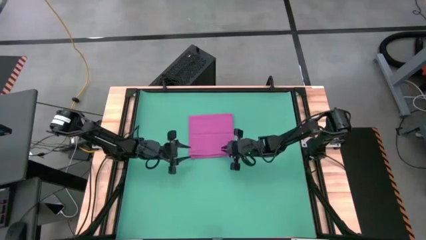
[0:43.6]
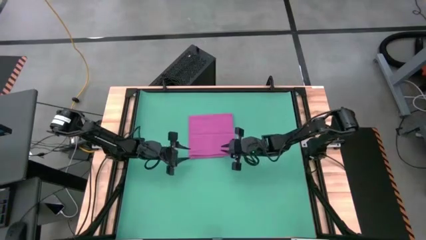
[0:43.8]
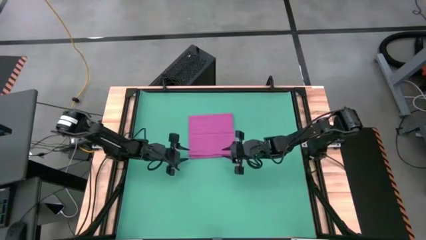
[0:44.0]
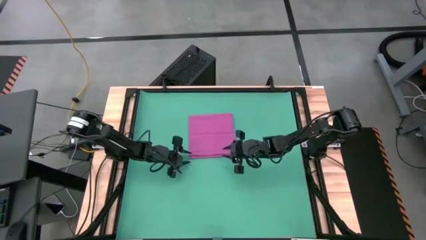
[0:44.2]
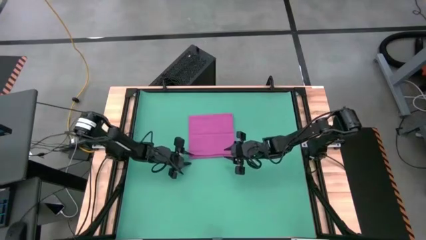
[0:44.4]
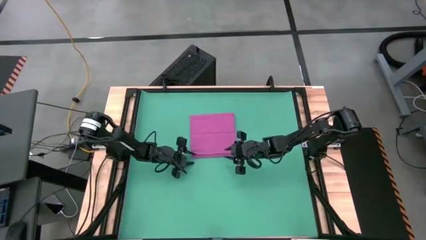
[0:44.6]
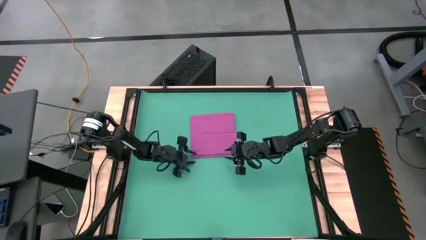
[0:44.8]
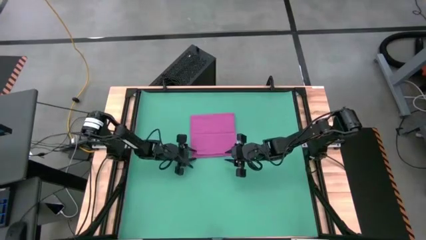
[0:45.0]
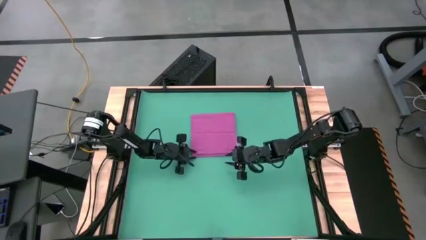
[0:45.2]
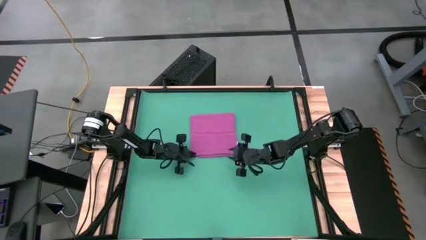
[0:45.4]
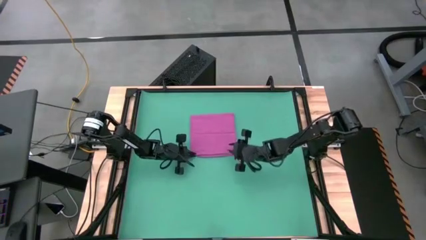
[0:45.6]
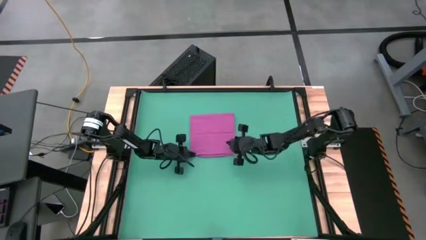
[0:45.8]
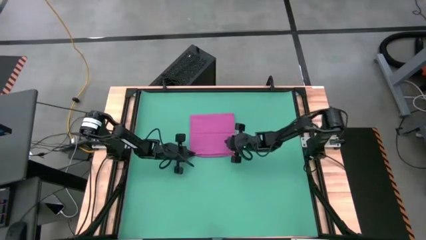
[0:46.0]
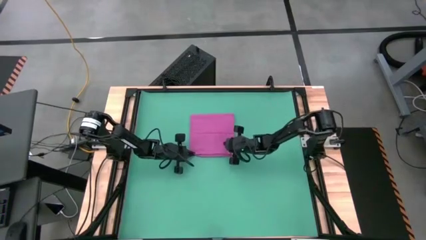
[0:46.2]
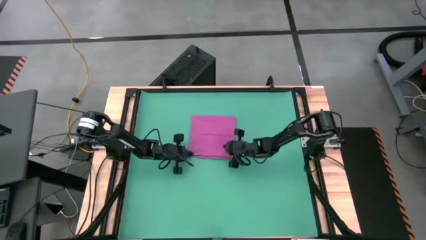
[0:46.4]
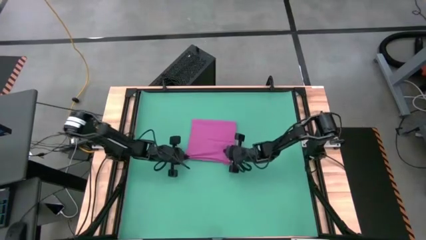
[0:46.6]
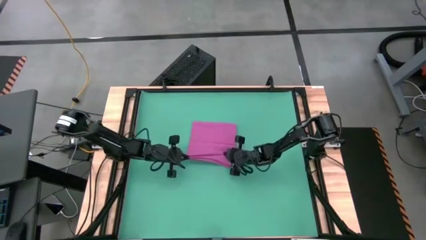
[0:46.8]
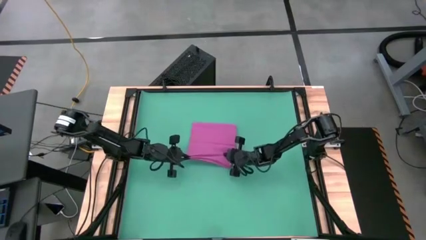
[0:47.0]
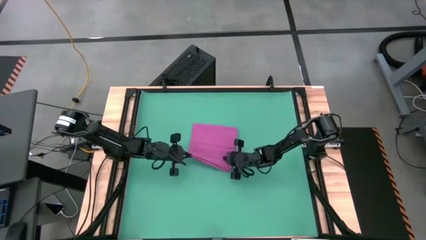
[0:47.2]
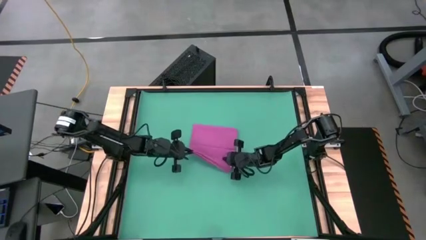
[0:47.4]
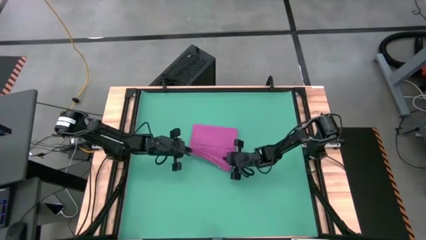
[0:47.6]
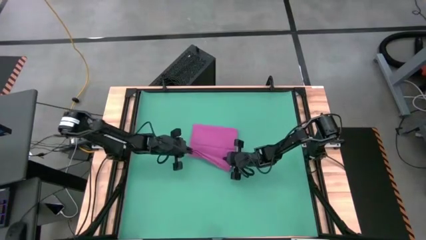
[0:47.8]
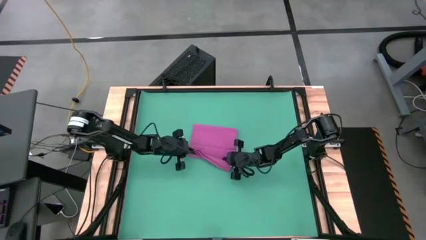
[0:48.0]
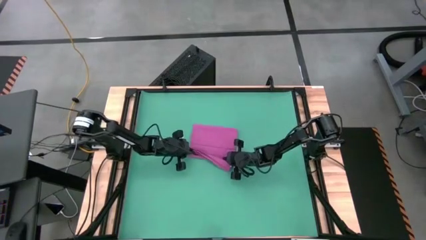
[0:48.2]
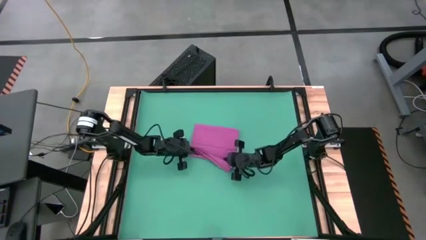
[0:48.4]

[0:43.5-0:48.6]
Task: Roll towel into tight, uniform cylinder
Roll the pink towel

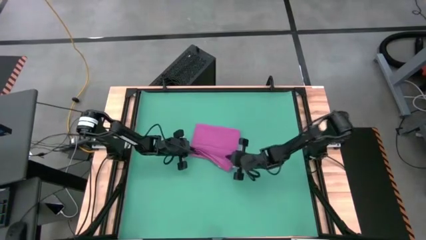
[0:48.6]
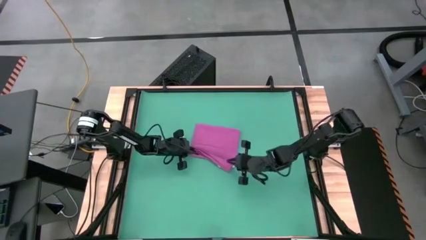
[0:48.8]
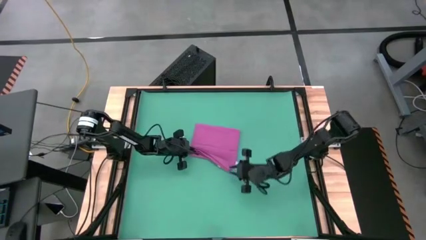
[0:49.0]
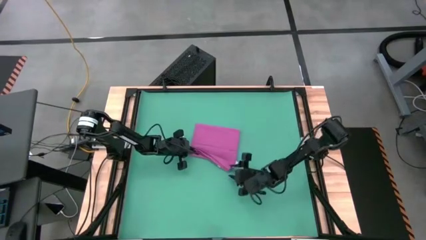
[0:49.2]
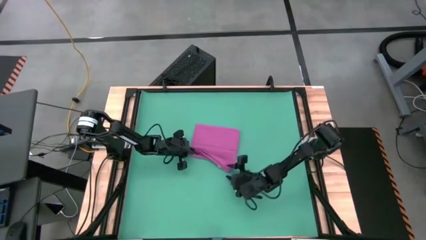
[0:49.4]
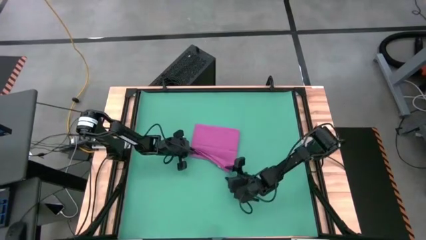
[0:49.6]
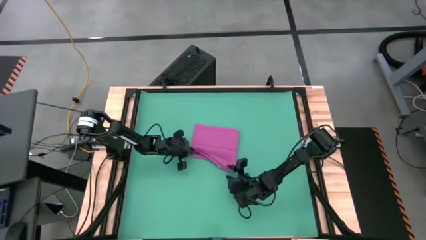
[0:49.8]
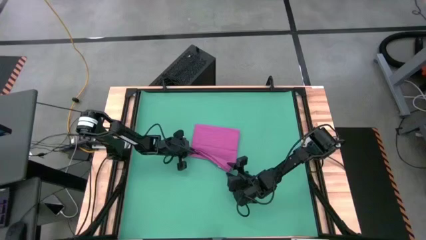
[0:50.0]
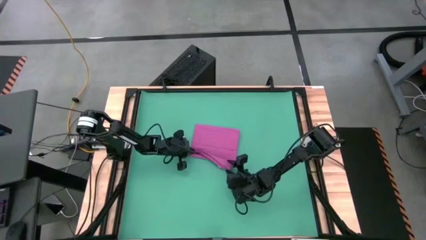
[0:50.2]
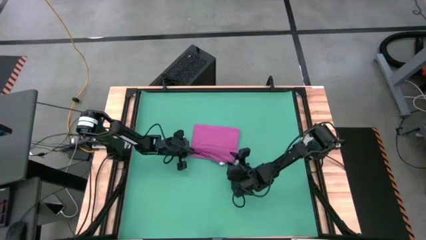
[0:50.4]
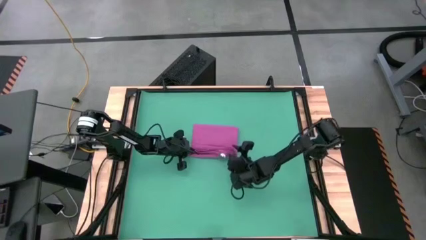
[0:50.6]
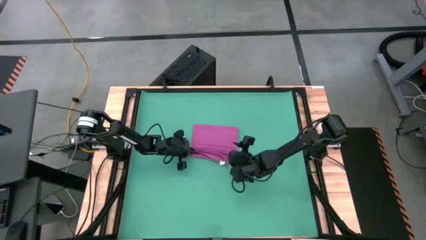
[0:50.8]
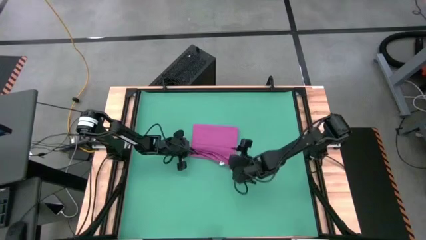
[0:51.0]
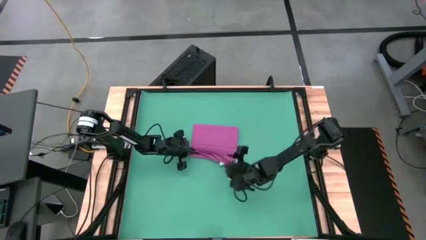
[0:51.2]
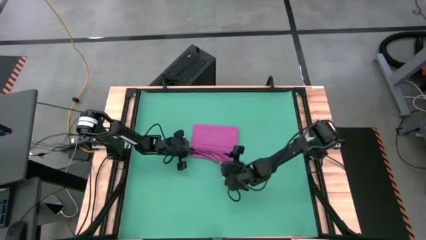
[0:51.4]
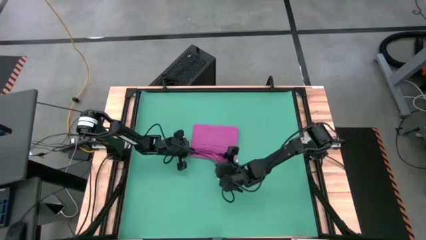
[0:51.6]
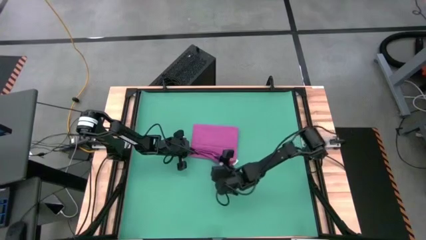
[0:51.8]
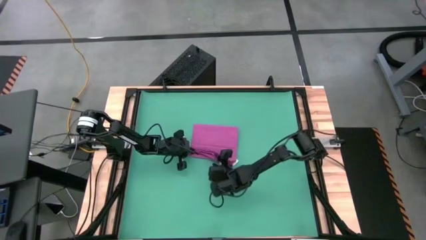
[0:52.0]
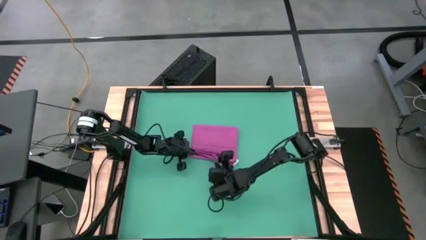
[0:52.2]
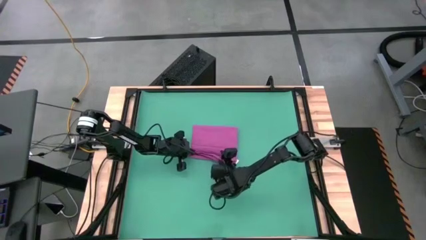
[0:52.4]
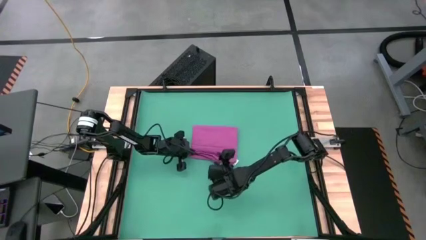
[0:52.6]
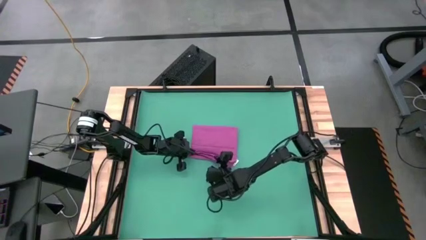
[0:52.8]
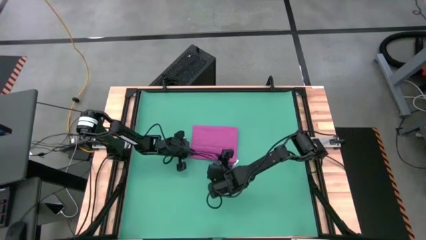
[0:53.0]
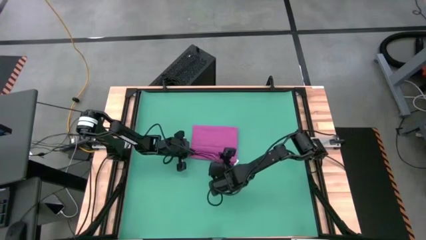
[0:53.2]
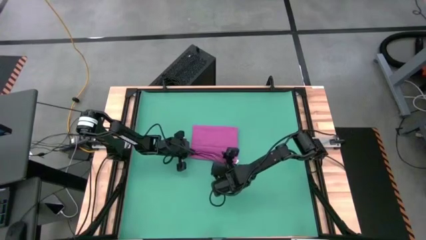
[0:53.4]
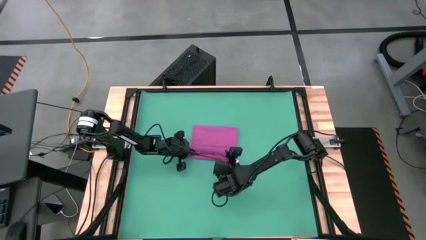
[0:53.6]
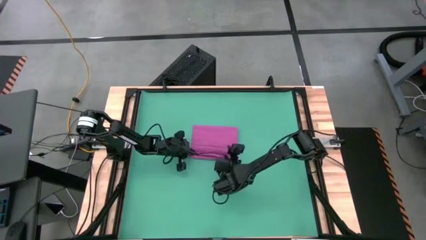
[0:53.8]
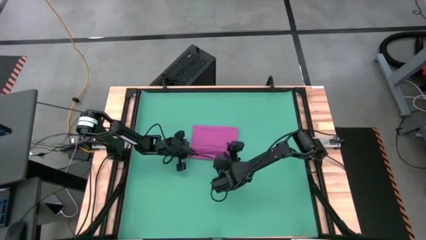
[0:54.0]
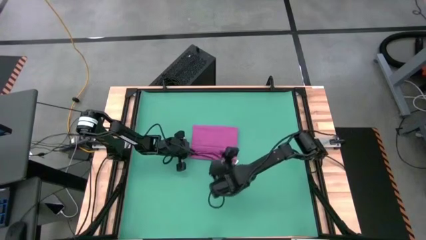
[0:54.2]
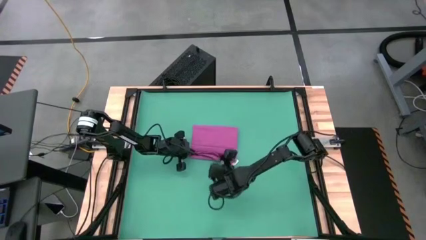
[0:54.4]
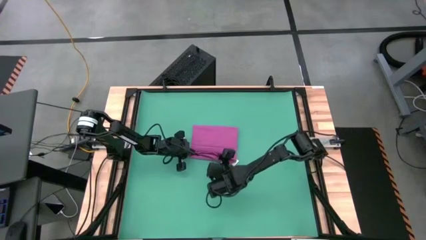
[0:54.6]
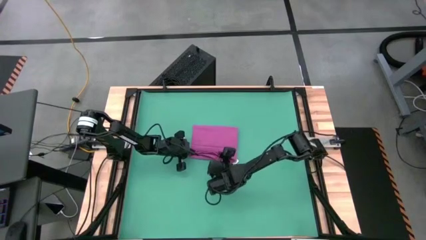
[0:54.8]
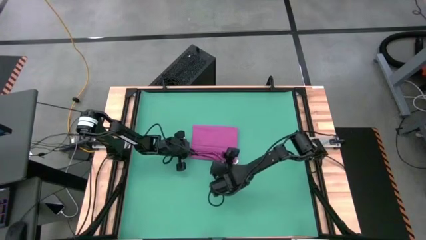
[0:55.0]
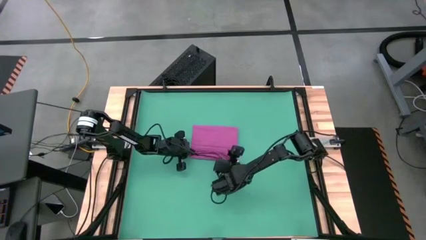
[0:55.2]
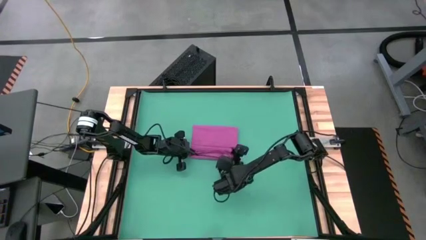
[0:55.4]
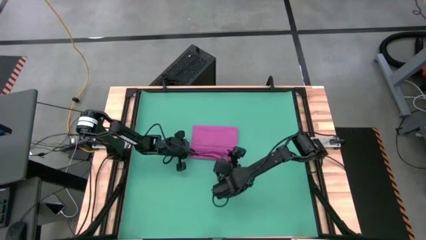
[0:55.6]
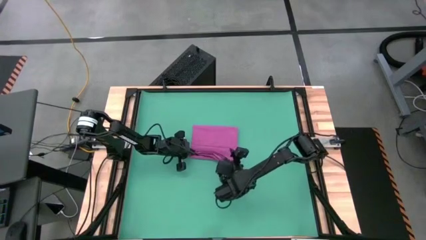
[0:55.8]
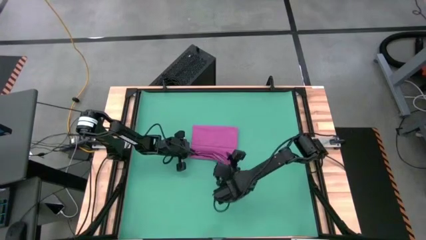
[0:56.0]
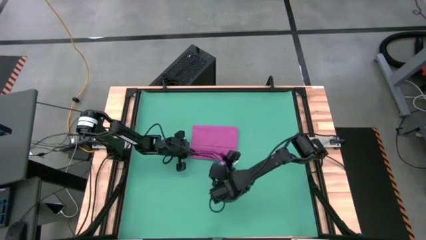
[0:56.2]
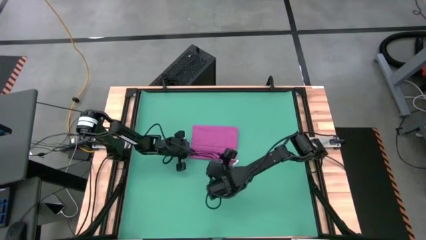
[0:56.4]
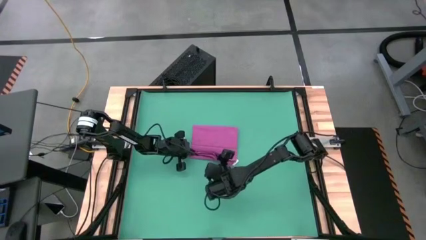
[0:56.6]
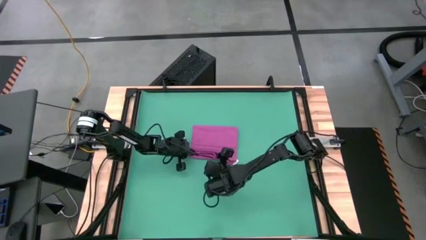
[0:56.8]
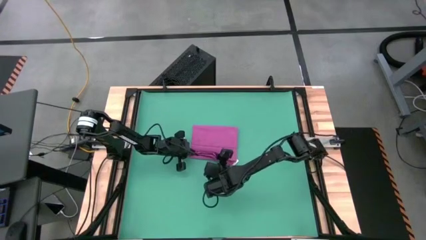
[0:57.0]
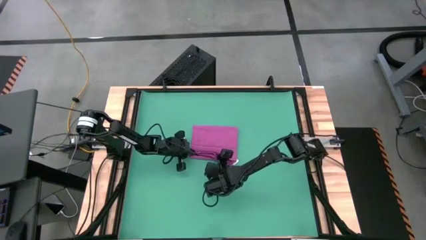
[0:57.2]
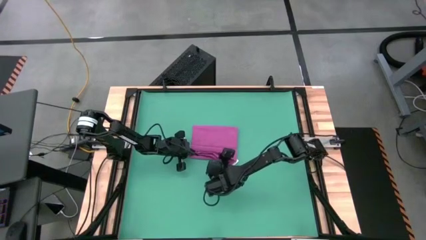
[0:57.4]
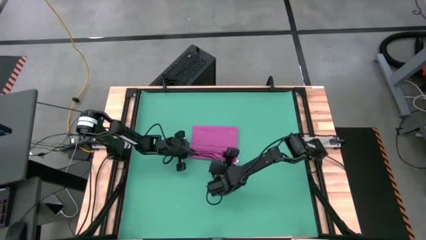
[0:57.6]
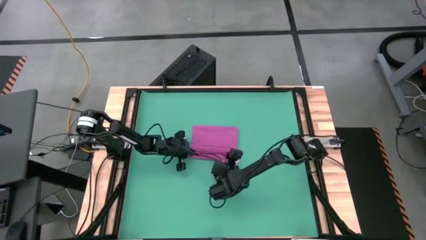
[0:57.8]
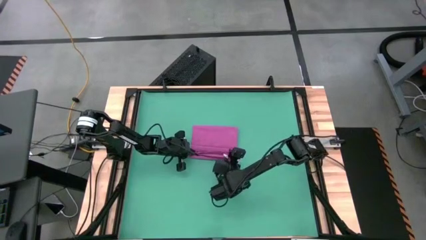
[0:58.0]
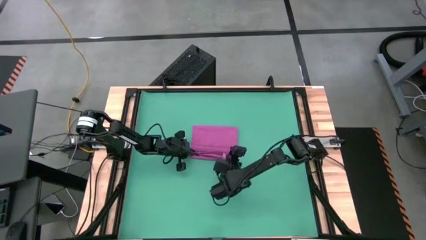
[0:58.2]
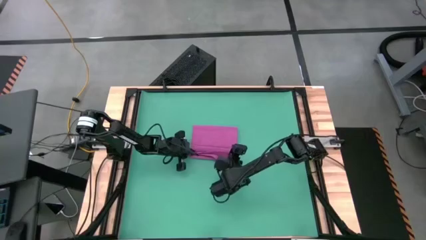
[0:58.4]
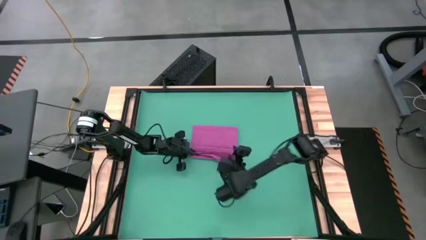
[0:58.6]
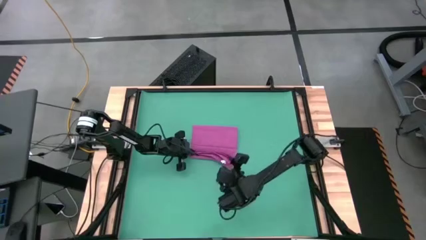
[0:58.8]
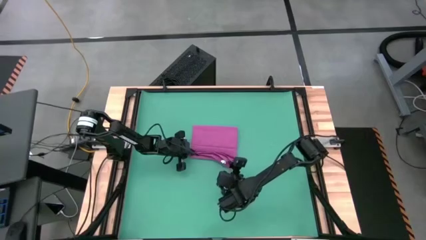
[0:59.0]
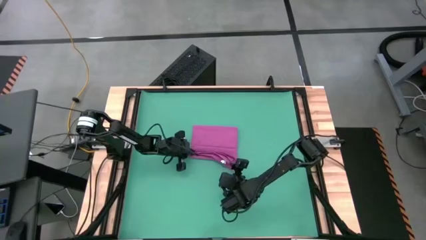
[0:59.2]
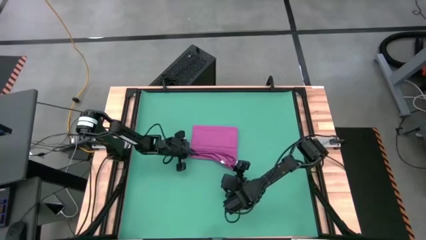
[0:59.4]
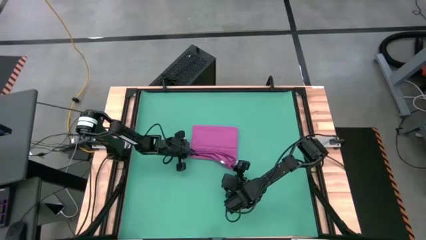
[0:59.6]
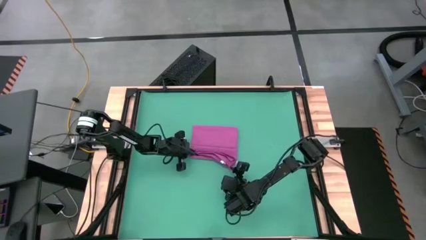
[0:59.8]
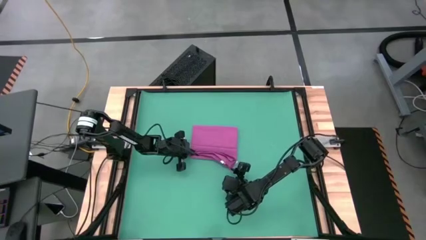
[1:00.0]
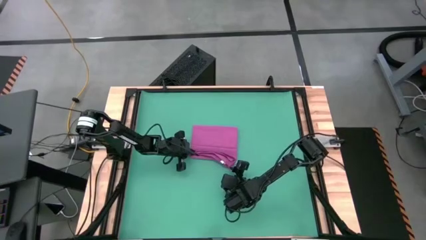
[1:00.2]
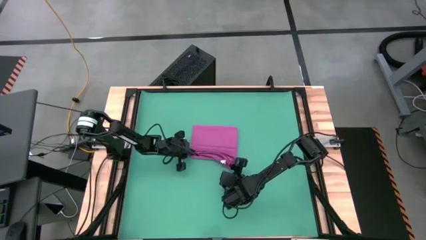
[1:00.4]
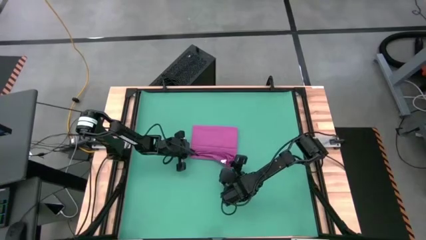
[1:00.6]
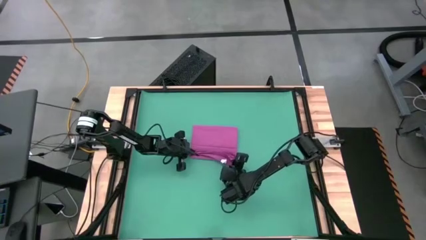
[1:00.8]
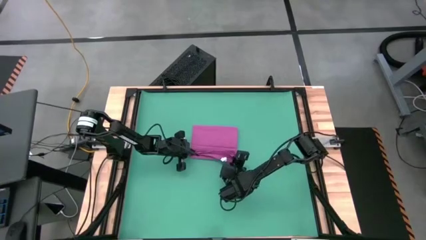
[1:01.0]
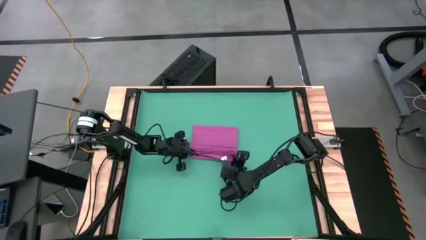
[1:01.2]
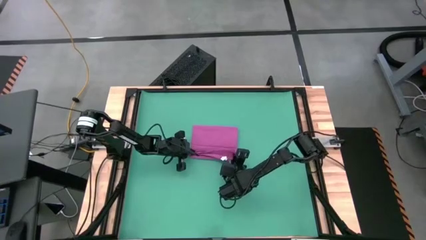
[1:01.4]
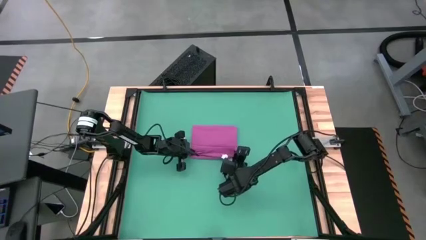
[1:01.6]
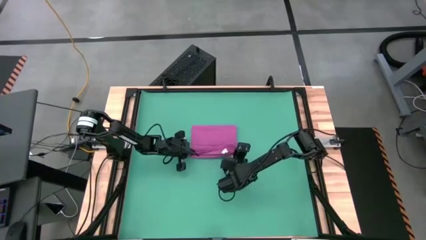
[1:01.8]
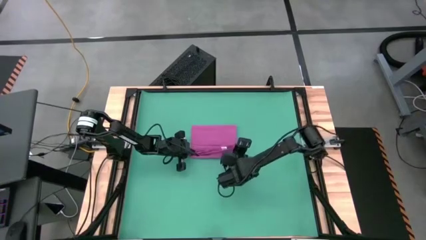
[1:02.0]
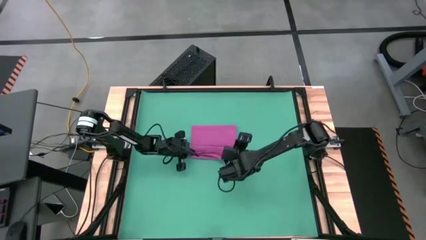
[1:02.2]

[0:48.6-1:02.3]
Roll the pink towel
